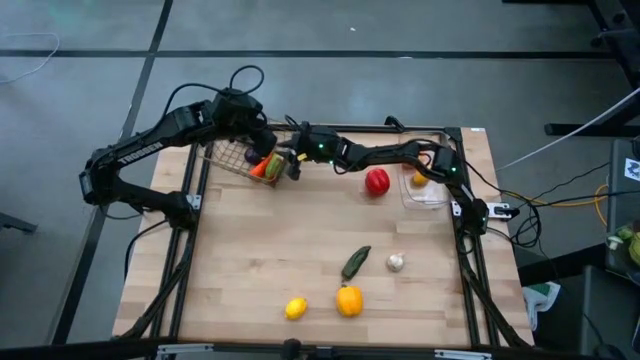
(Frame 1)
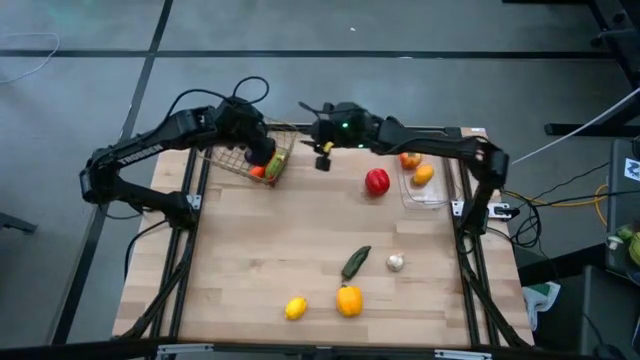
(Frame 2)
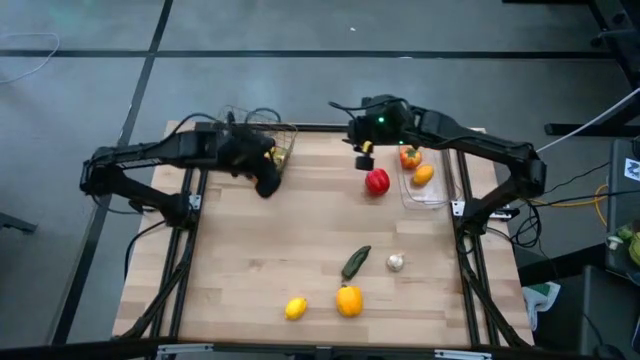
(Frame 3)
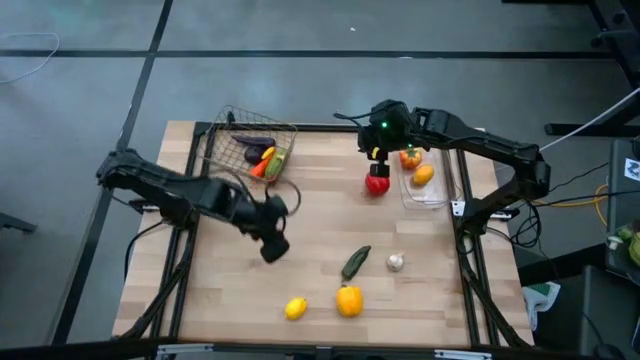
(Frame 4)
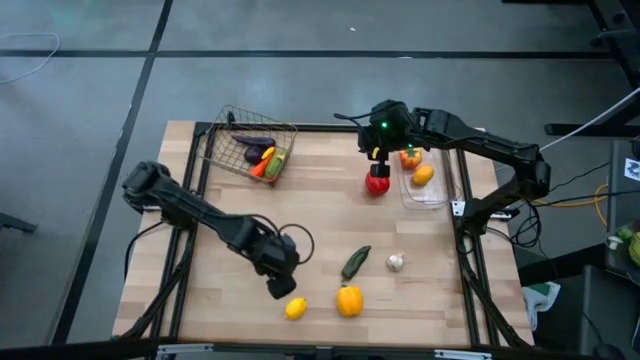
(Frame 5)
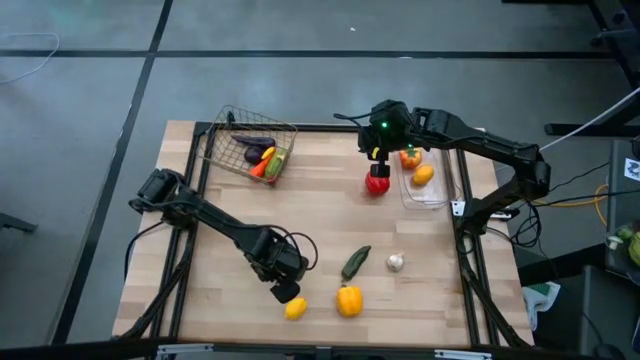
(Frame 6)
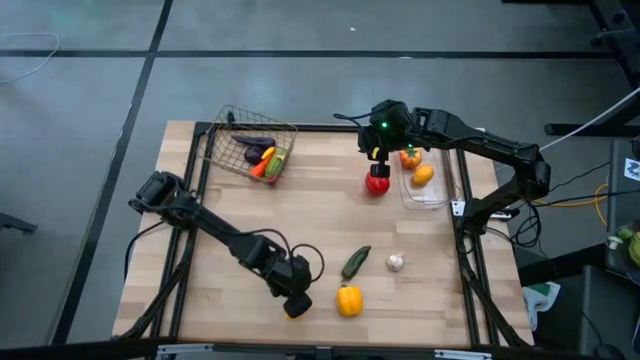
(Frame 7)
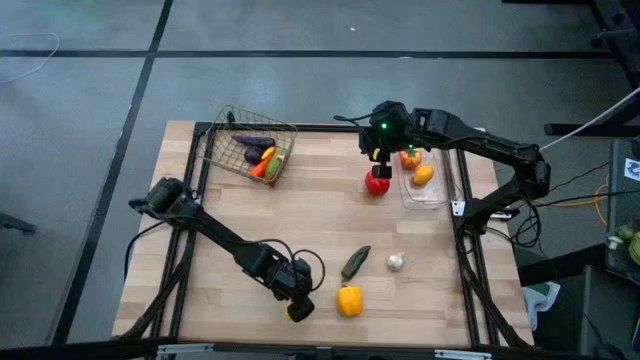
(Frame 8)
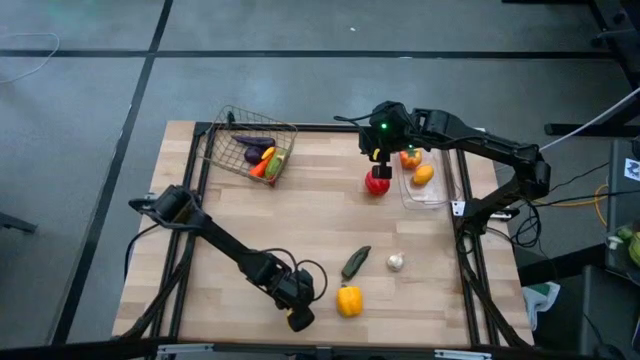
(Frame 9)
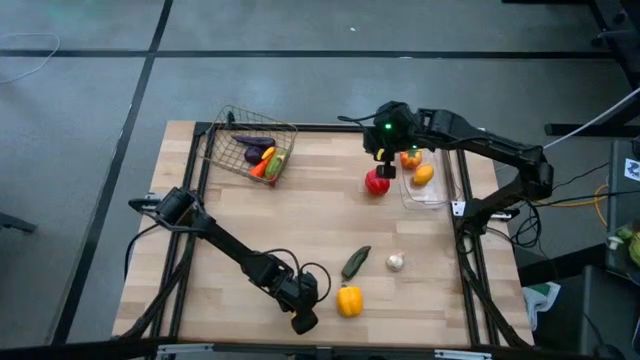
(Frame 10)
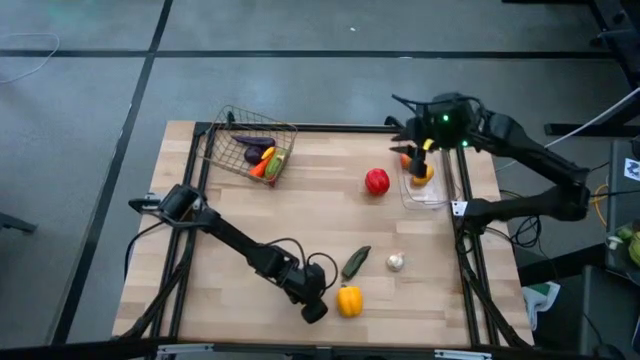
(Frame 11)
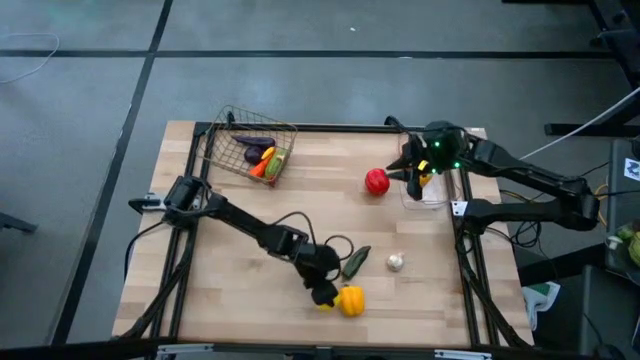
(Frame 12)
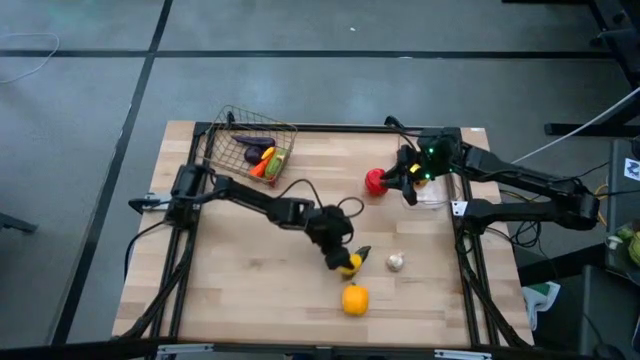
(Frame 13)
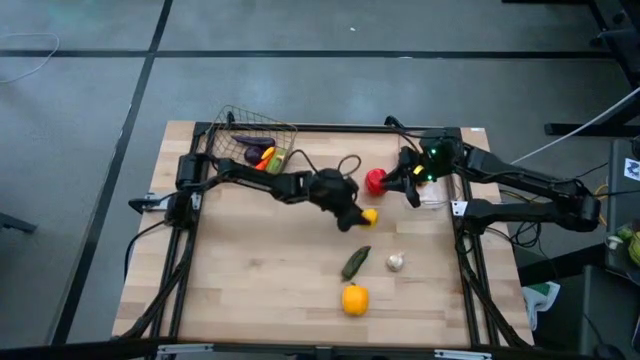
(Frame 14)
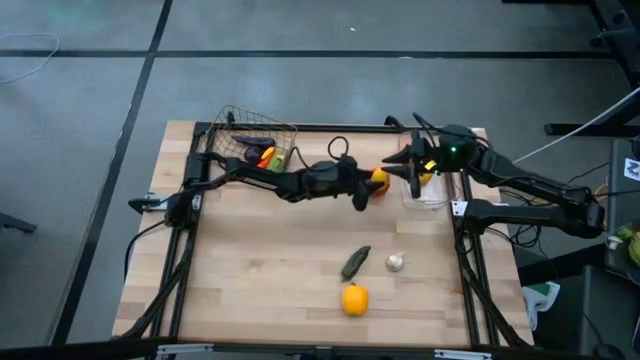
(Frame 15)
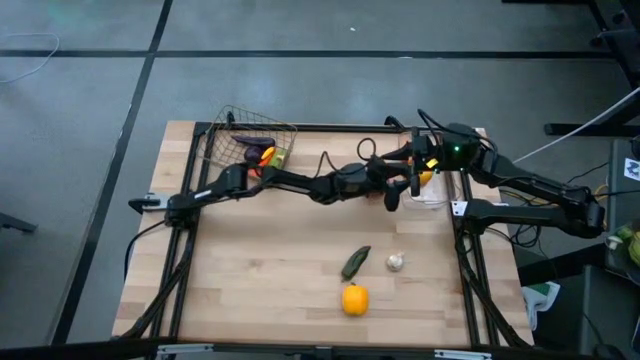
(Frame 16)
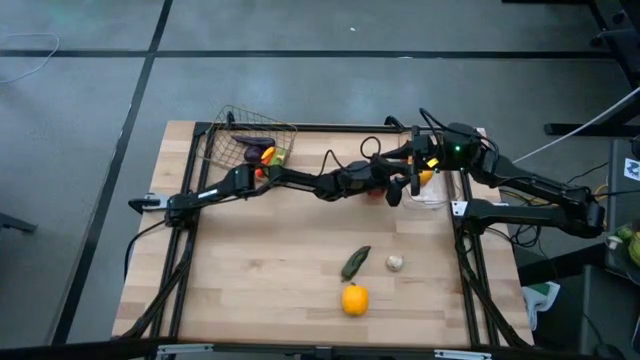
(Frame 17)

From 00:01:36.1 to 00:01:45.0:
Task: Sort produce into baskets
Put the yellow lemon into the transparent bin

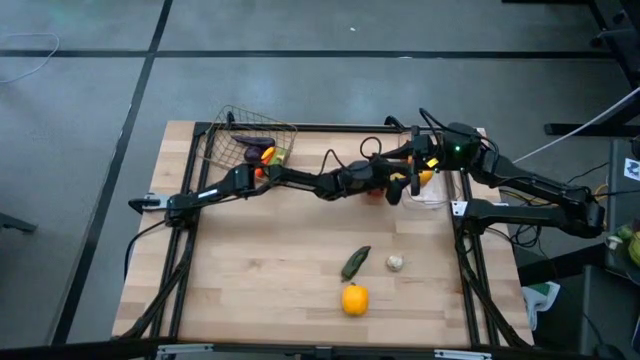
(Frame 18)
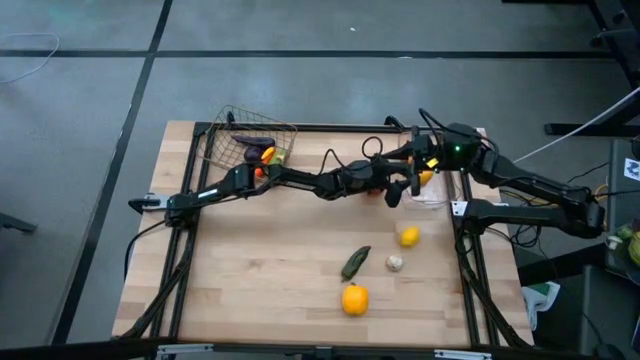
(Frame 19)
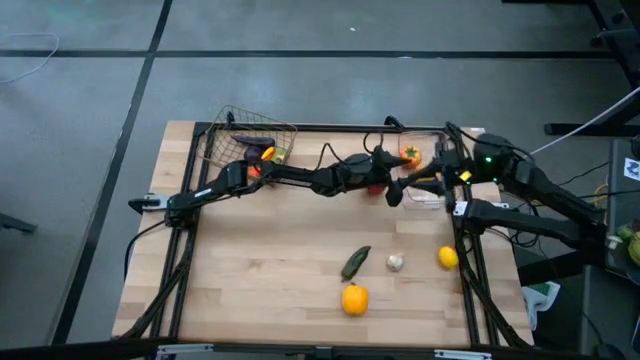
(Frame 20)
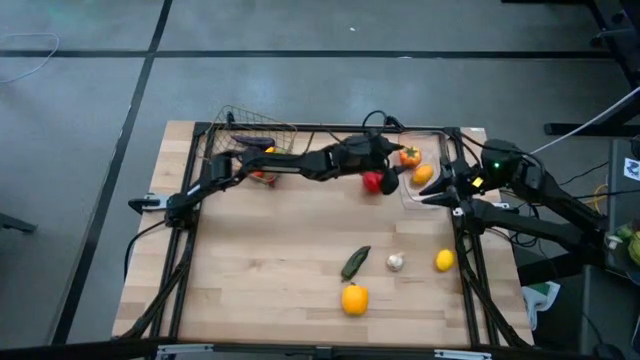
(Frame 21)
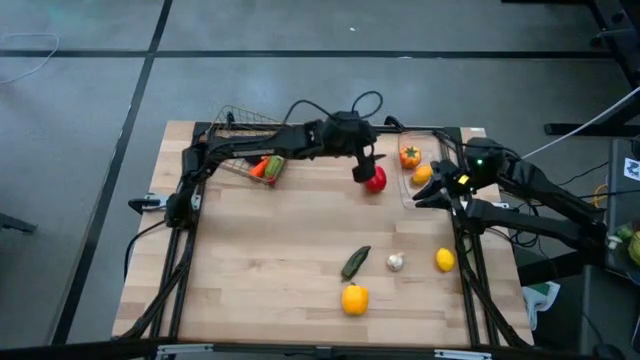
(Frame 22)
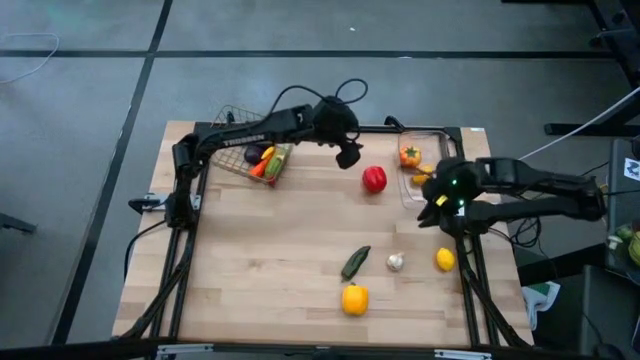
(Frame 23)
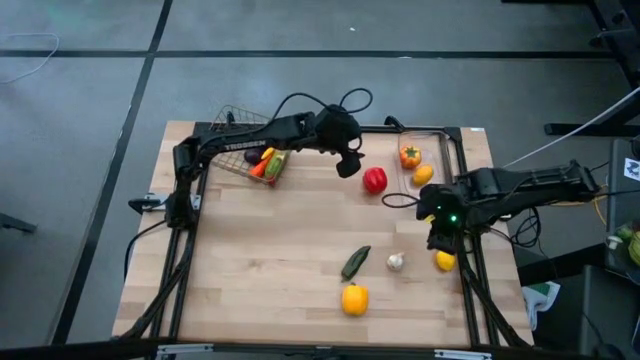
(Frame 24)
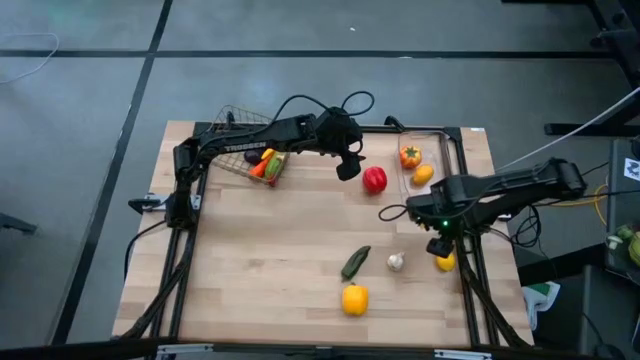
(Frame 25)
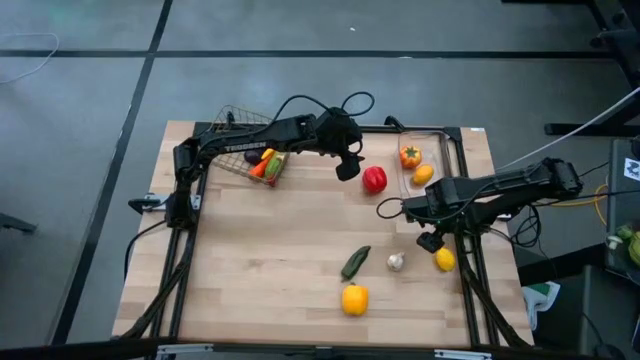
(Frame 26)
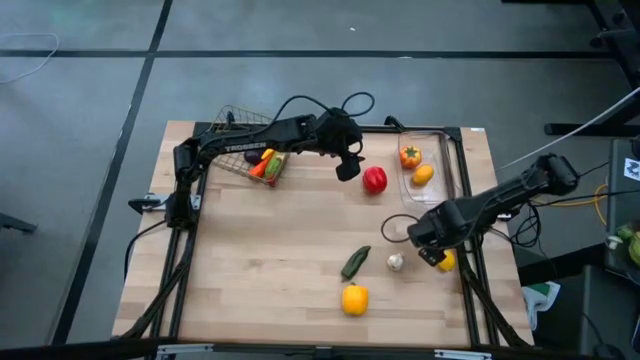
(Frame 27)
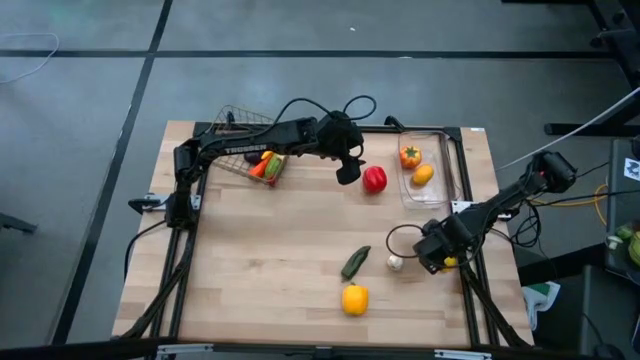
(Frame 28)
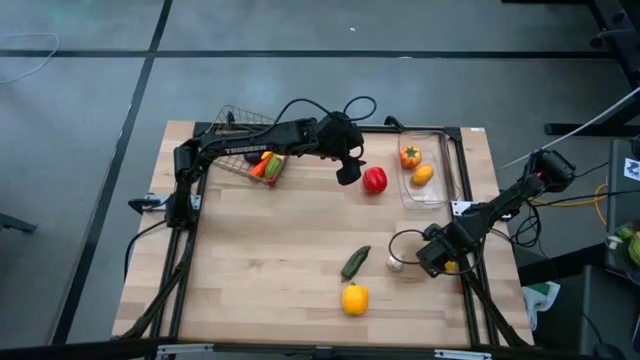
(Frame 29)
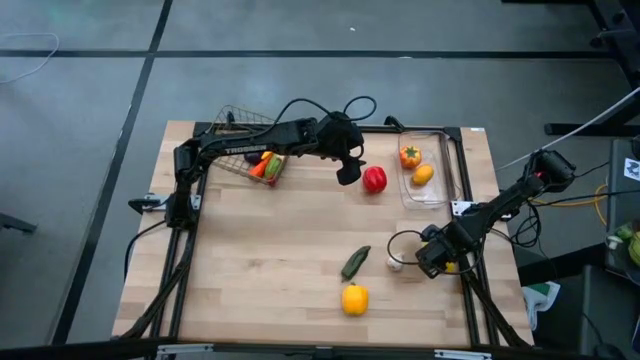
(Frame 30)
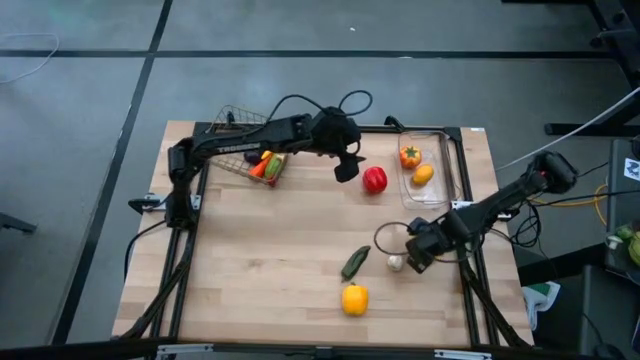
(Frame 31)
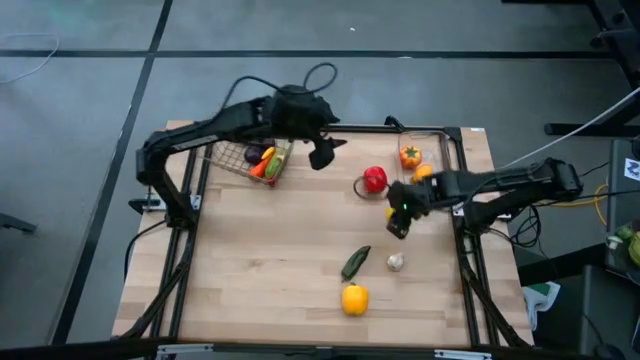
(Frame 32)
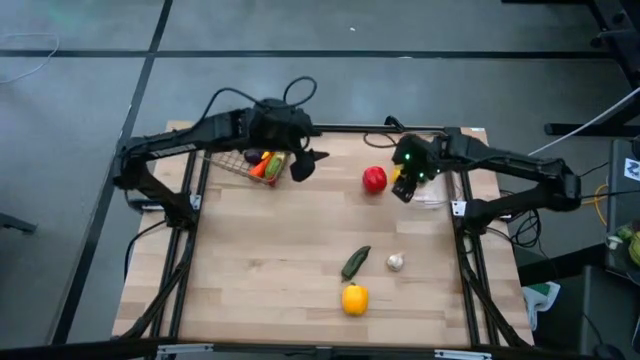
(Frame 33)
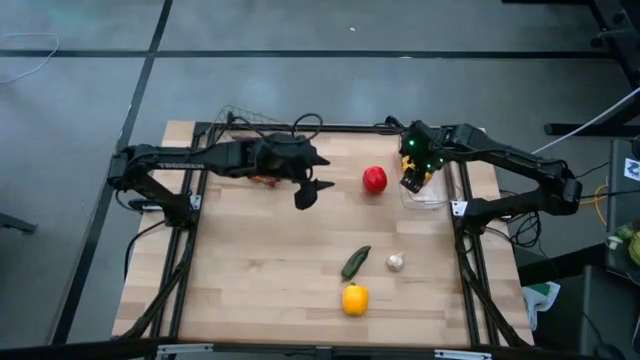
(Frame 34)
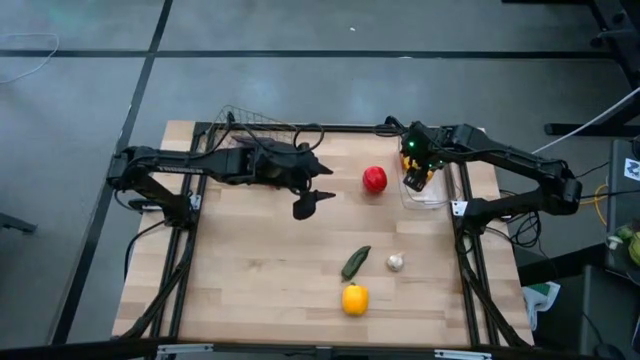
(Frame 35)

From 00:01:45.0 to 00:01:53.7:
Put the yellow lemon into the transparent bin

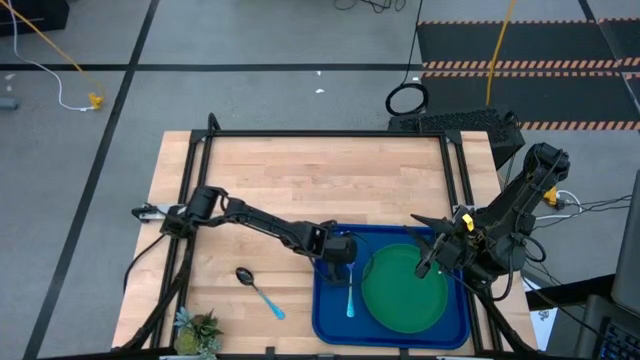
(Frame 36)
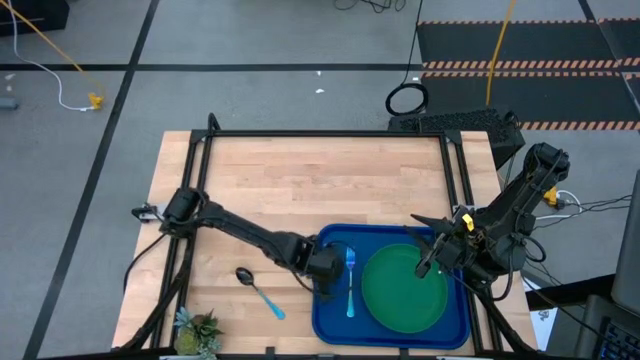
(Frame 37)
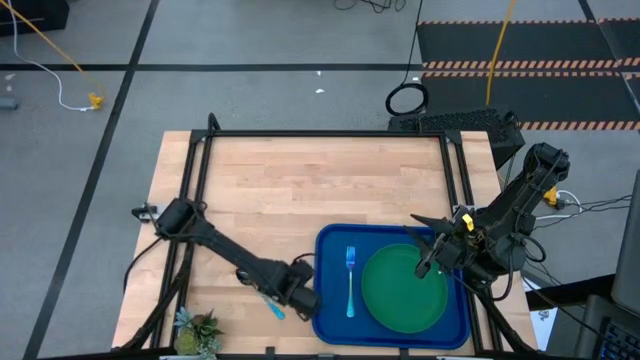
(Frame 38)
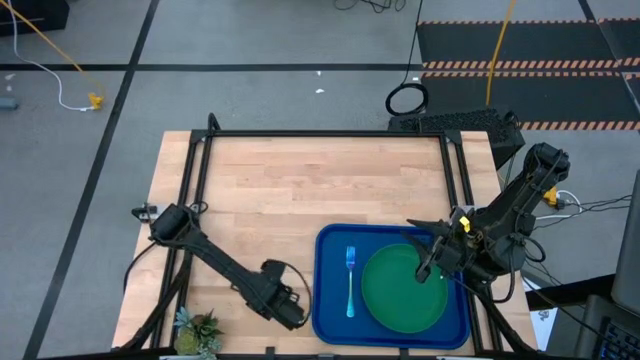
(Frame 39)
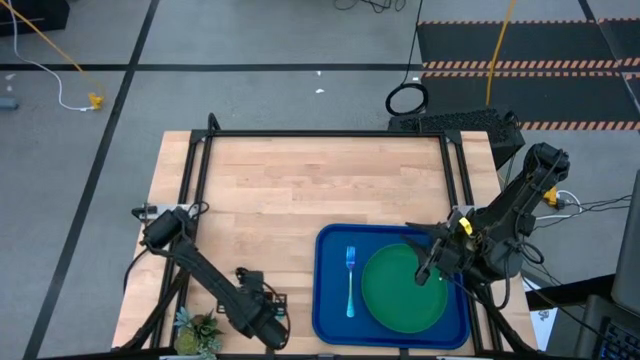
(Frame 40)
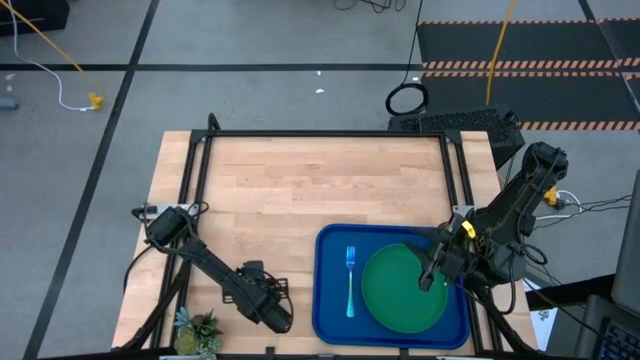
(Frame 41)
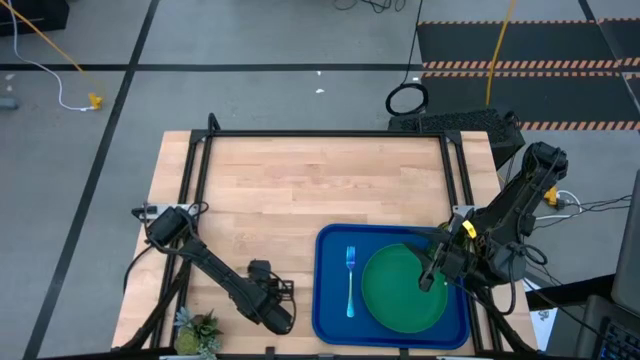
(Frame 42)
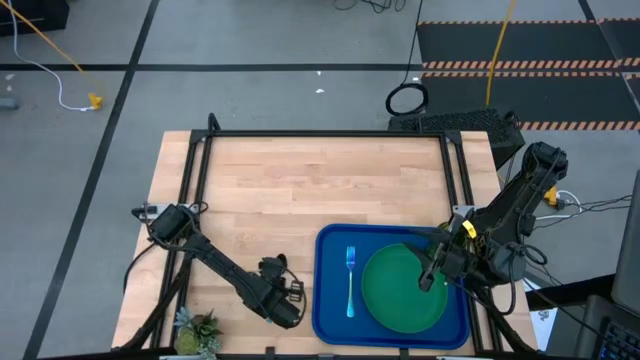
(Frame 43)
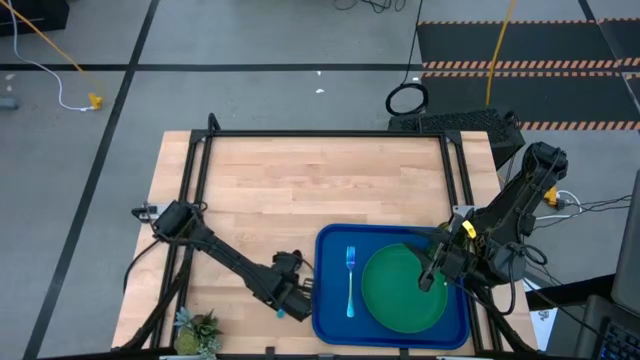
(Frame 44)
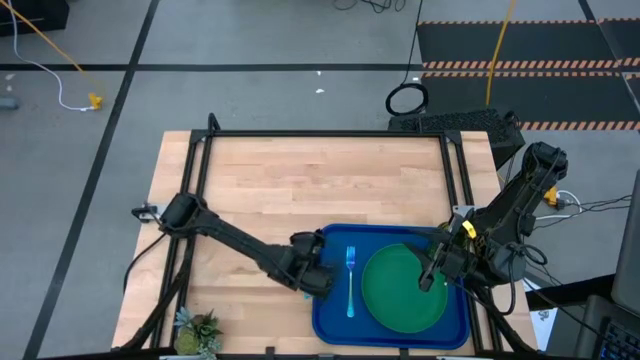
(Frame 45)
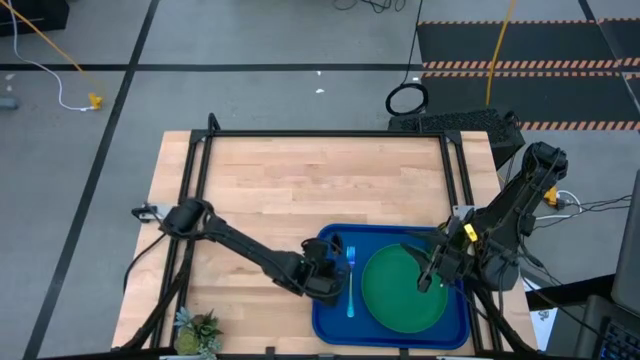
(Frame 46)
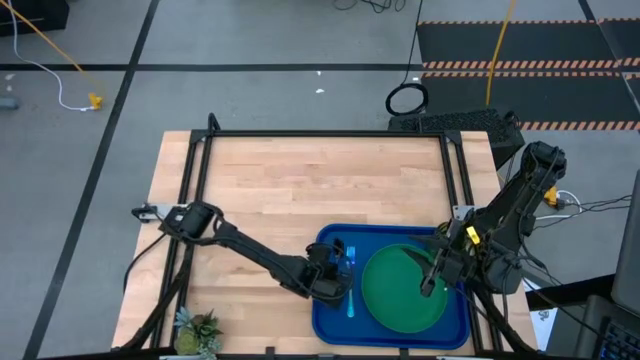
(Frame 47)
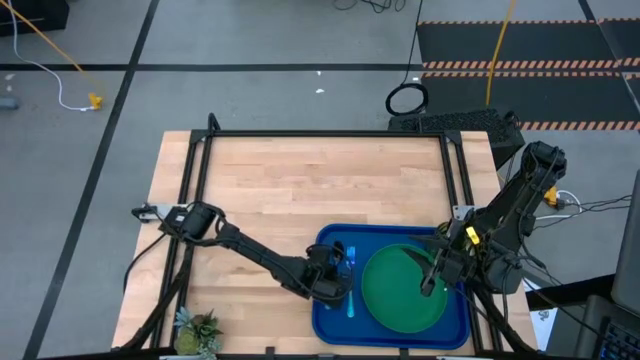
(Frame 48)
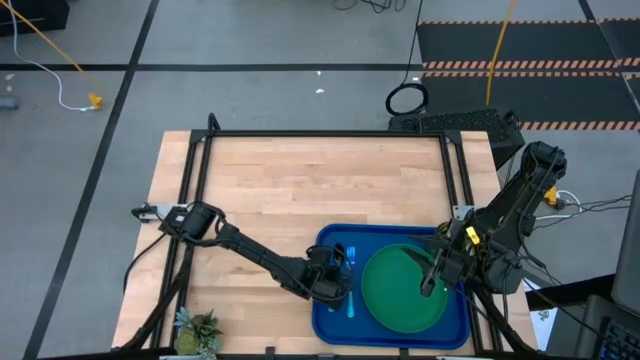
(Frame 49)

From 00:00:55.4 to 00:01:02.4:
Task: Pick and place plate/cup/fork/spoon on tray
Put the light blue spoon on the left side of the blue fork on the blue tray
